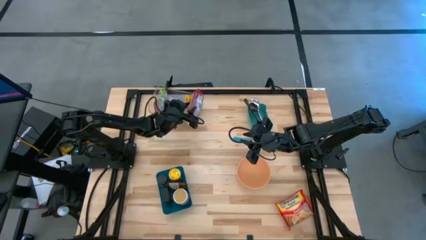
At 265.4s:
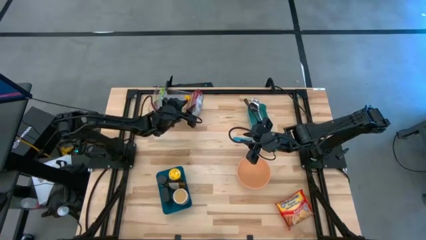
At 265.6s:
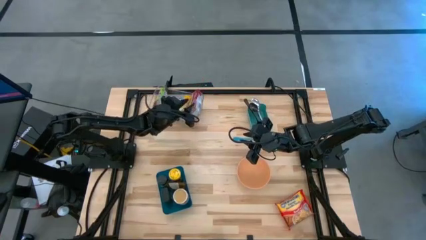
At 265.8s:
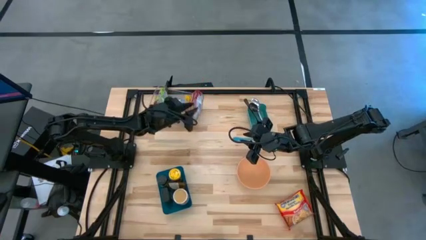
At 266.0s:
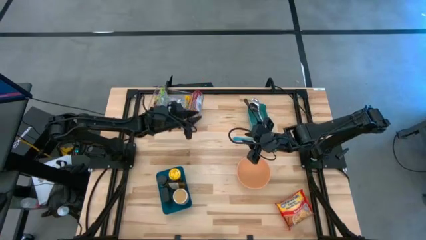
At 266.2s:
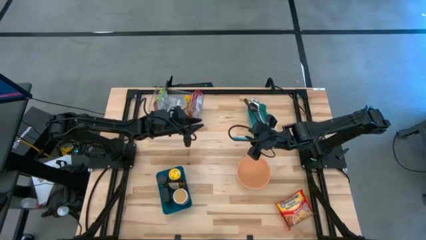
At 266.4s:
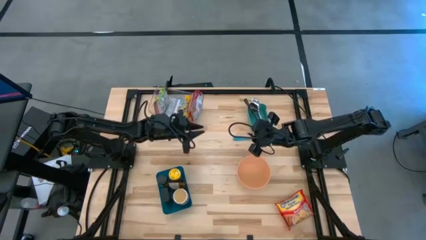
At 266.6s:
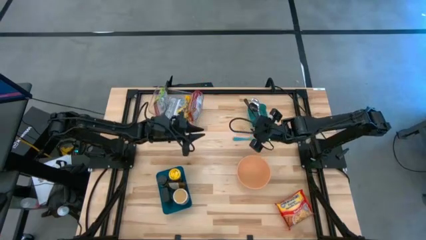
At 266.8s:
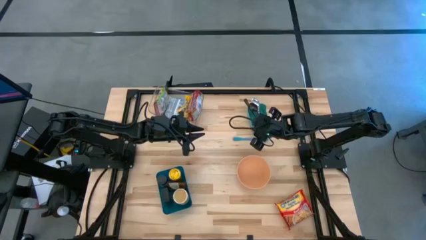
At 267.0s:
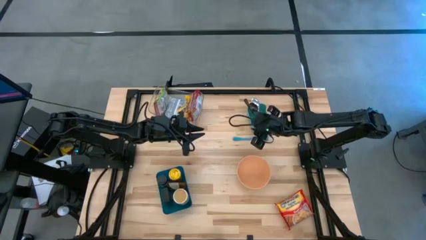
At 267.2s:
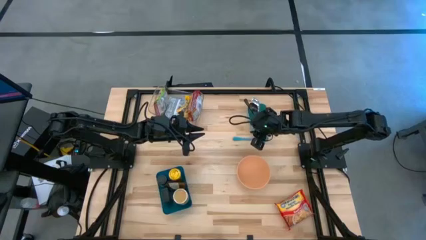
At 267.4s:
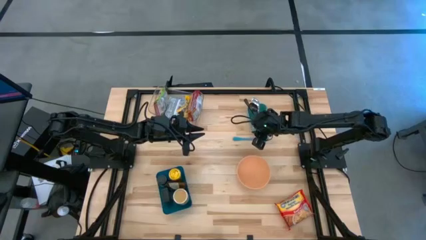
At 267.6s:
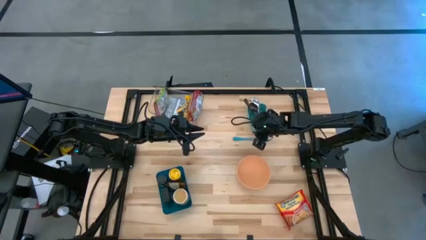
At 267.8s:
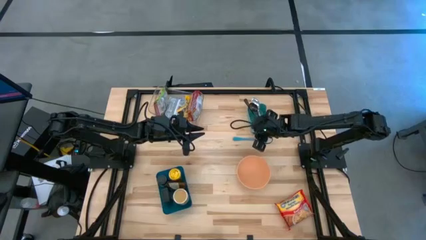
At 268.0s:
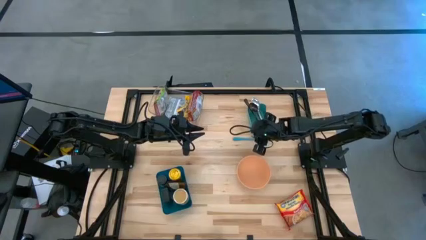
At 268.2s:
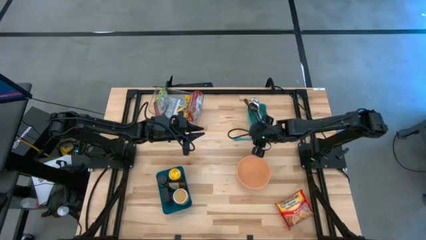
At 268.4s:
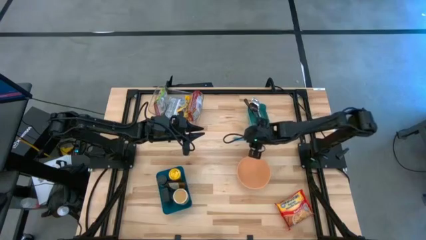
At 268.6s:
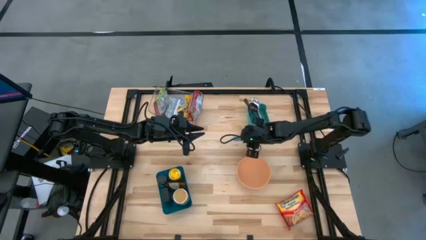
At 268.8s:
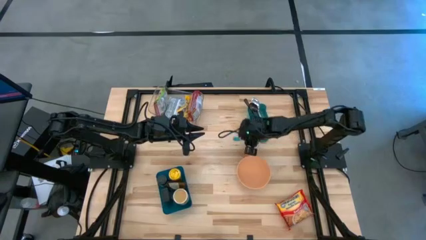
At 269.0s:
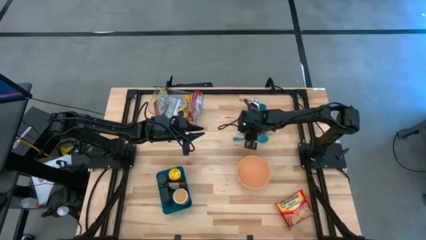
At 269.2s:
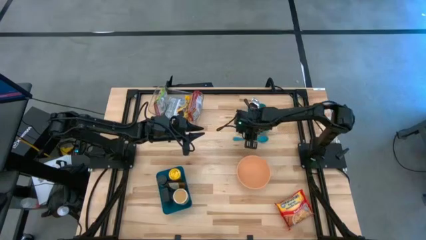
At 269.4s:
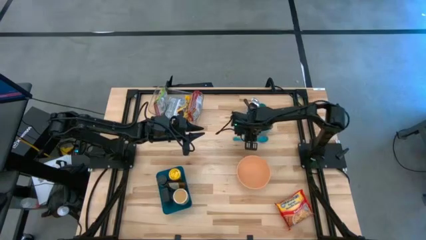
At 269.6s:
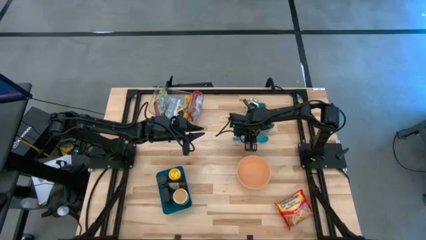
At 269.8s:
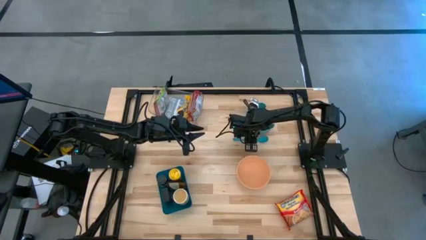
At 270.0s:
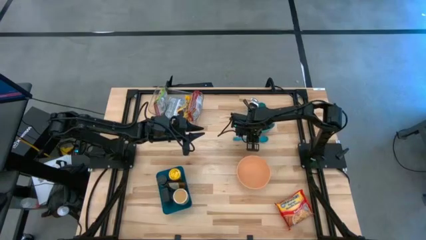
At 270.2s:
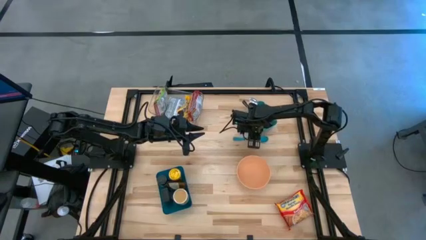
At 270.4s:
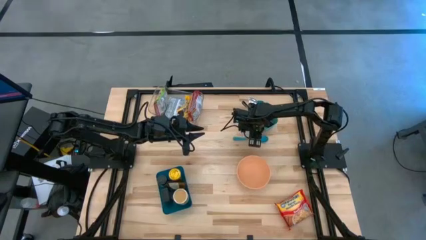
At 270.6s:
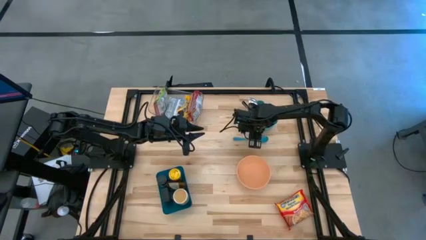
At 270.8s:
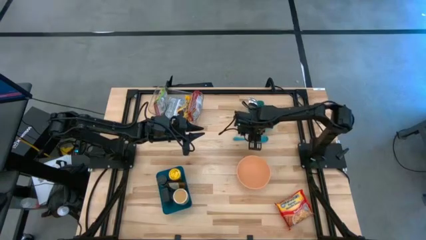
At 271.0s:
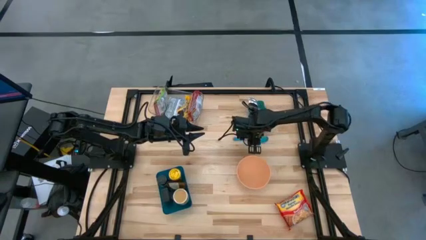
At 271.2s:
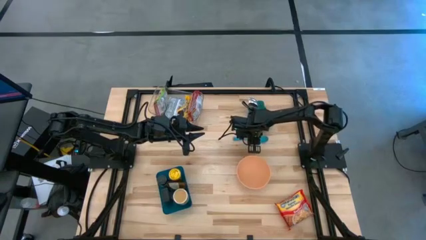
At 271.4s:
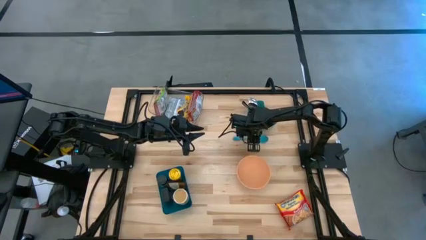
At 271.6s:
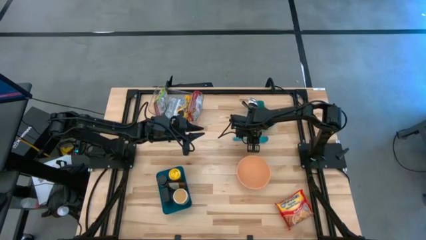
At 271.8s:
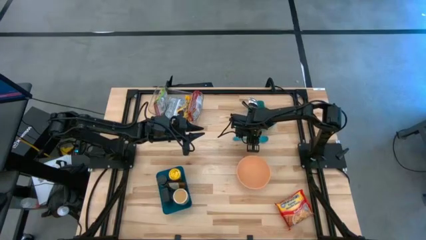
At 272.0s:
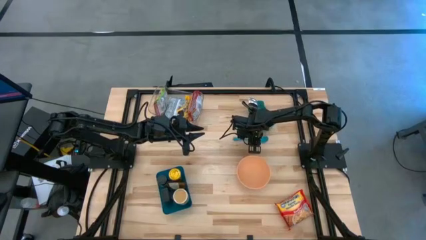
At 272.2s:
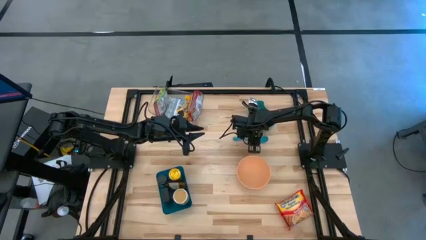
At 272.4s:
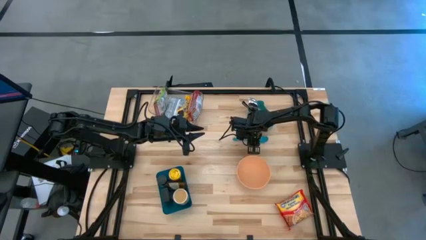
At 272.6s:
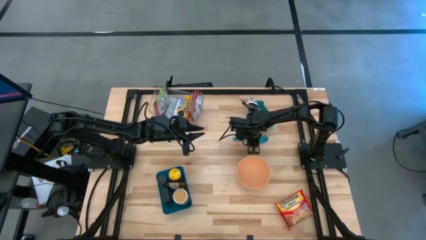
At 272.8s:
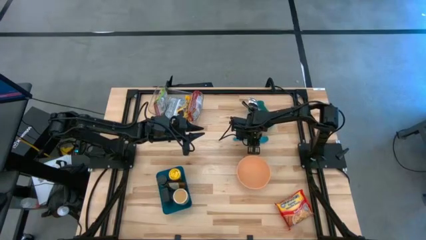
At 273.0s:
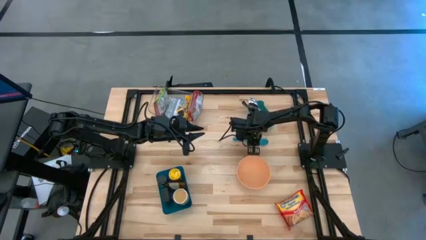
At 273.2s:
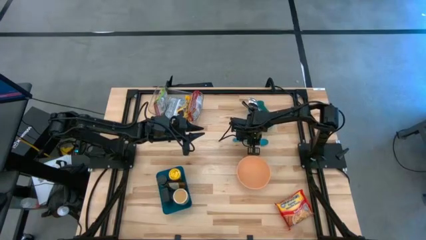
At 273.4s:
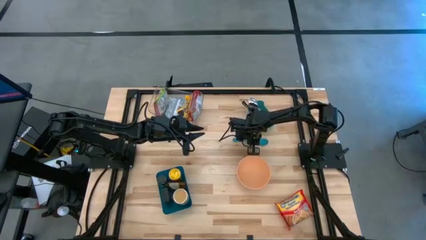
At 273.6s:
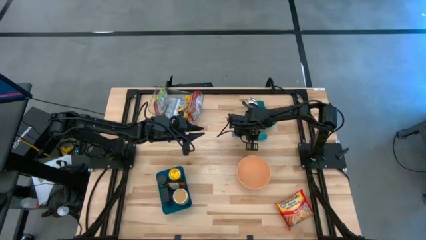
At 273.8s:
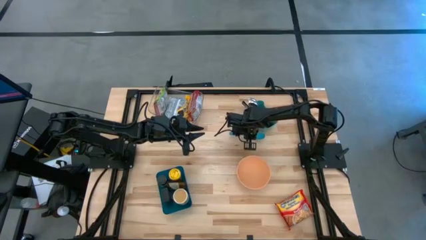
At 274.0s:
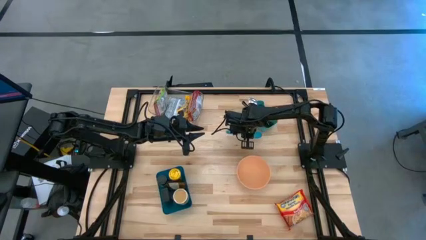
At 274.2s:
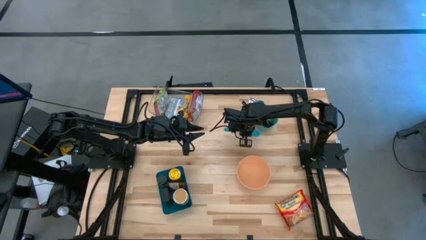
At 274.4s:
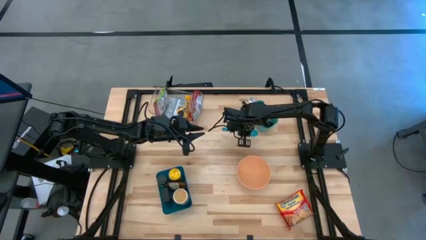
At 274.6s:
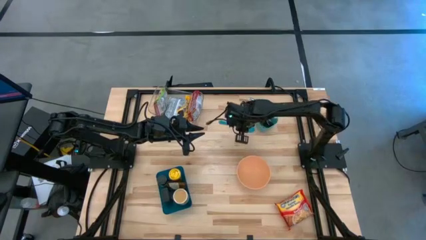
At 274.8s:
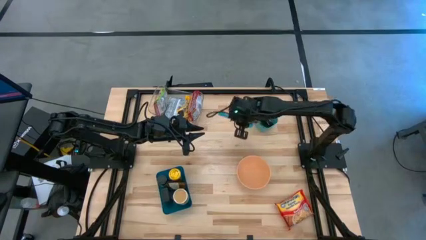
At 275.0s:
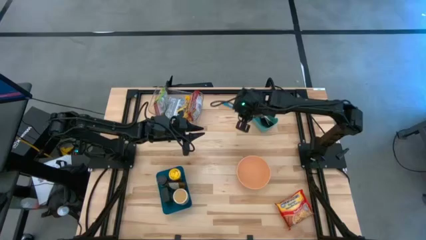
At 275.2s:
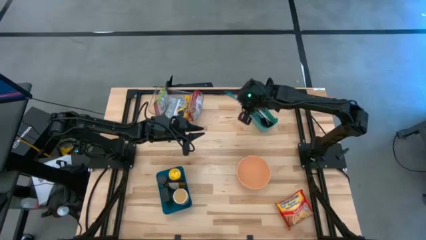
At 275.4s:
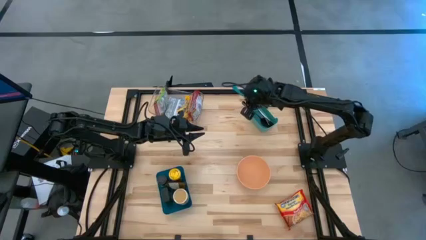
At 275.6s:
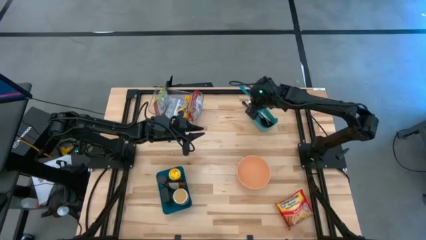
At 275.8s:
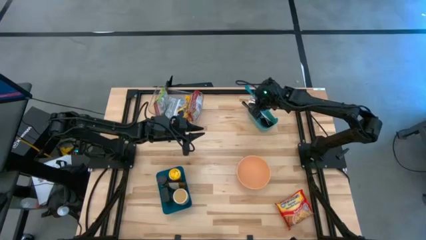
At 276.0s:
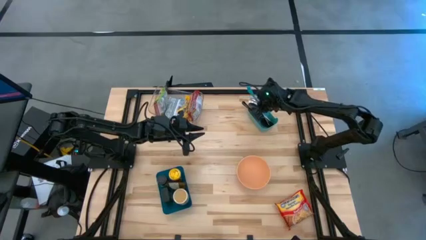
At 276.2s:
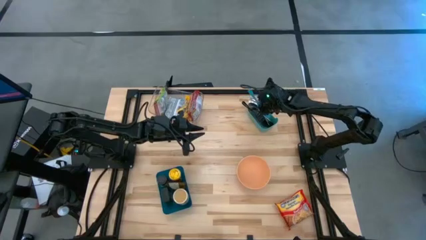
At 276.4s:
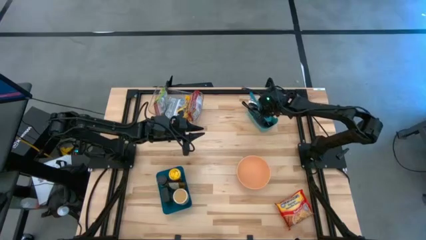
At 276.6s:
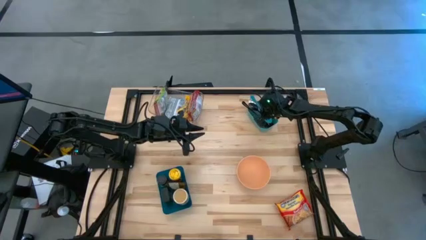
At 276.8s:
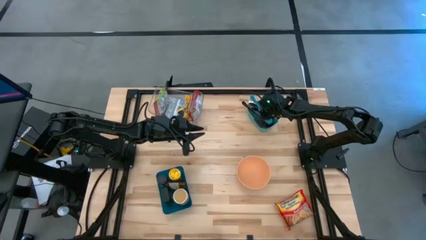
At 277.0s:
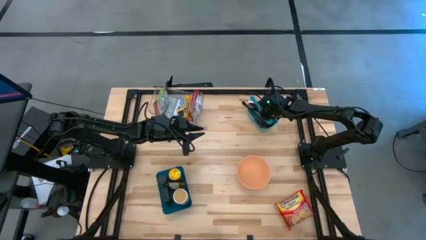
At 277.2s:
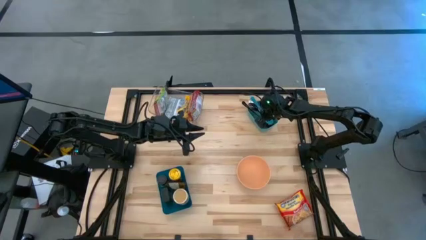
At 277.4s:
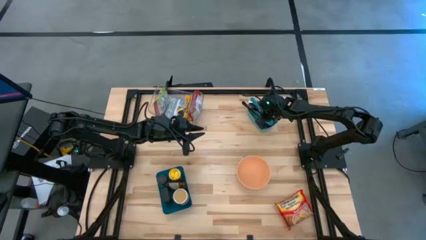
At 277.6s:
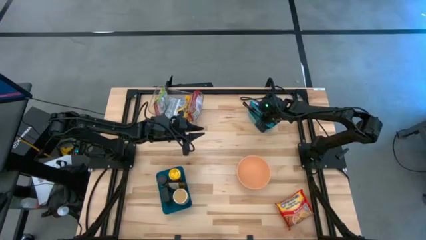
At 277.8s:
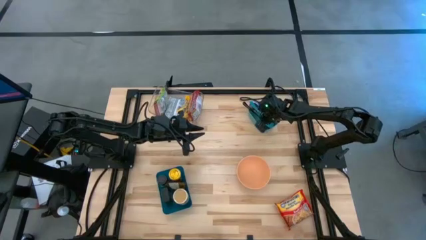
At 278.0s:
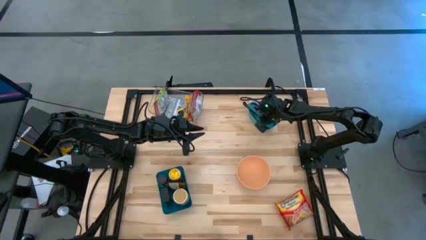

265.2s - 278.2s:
Task: Pick & Place Food Item
Put the blue baby spoon into the green bin

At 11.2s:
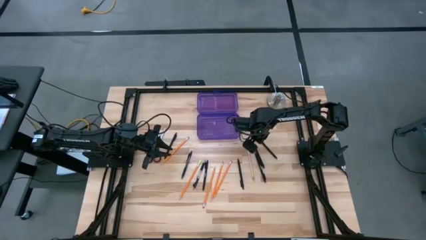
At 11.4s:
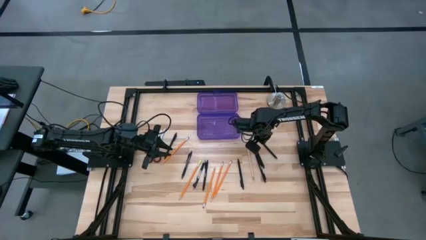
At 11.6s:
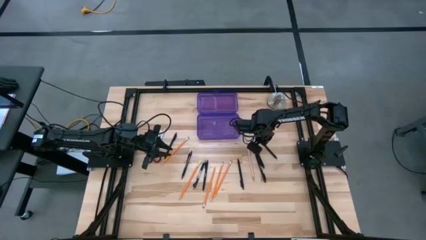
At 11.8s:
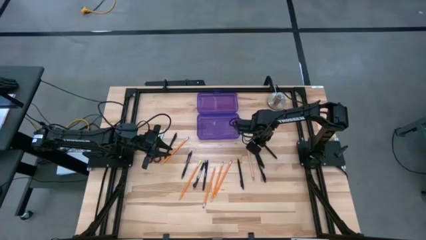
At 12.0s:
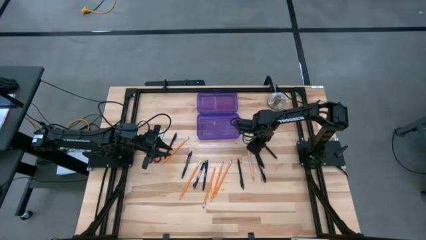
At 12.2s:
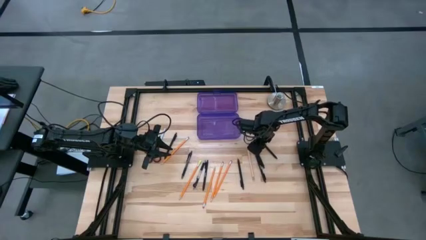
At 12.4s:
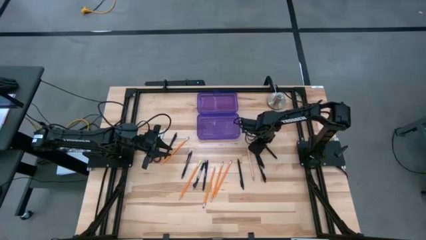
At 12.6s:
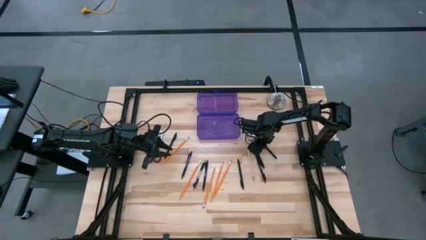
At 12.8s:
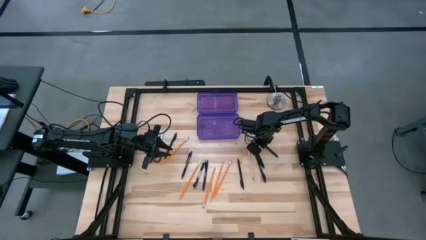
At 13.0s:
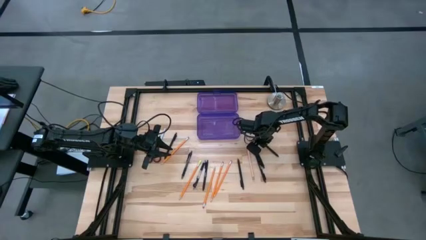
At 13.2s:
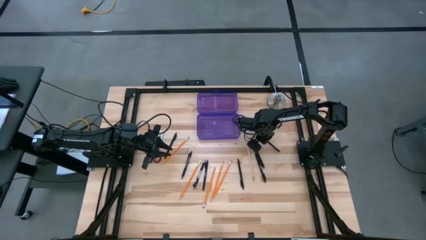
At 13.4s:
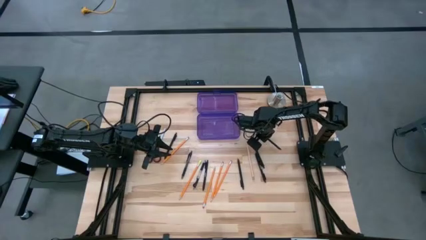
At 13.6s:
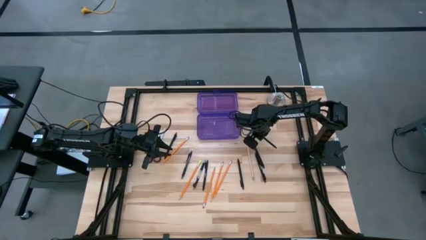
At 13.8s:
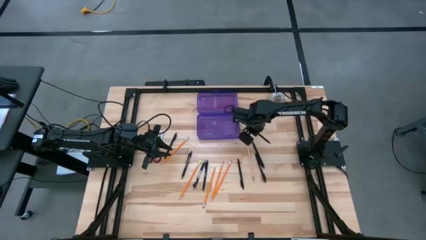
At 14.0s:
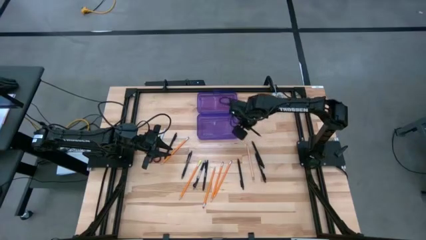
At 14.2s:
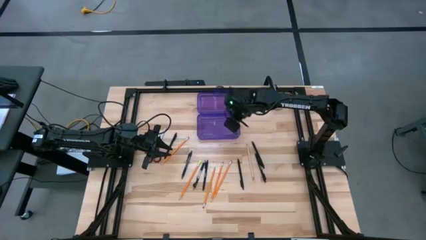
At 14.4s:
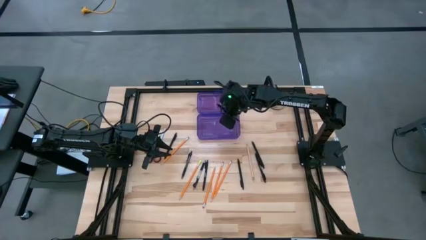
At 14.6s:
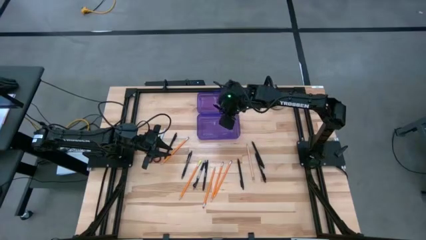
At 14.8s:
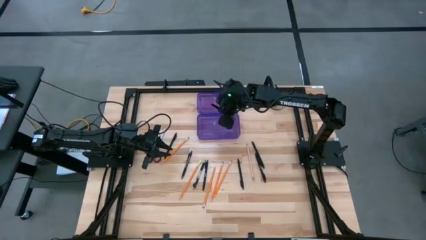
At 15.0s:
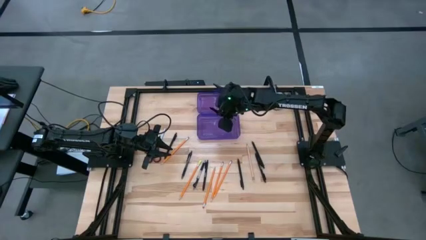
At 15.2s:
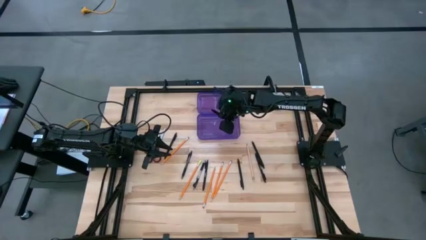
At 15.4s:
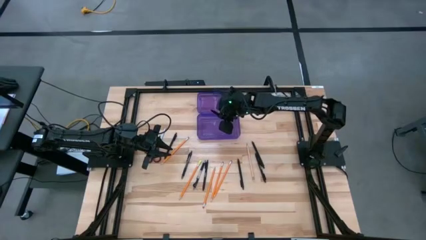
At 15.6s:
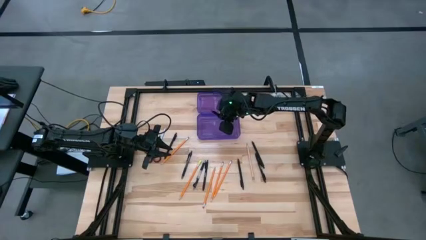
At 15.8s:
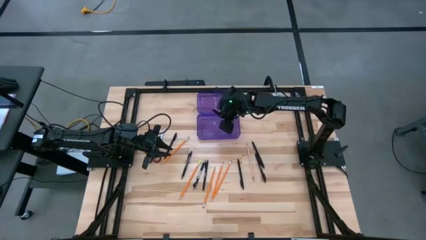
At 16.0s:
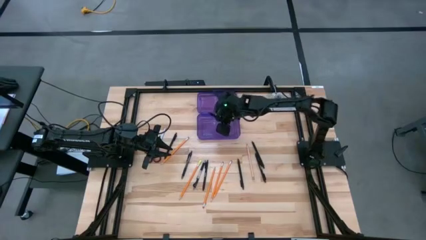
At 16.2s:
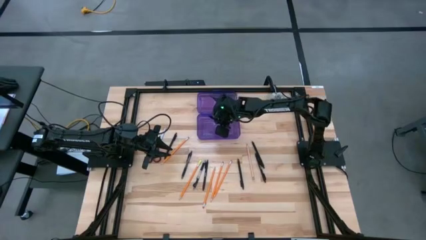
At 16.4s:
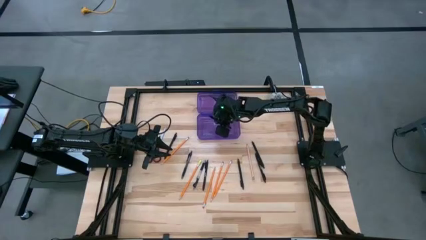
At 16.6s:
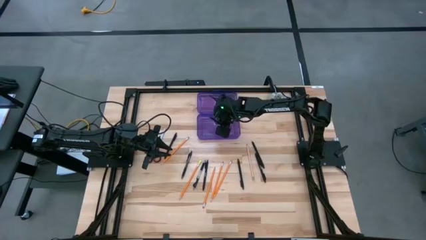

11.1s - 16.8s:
Task: Pick & place school supplies into a supply box
Put the black pen into the the purple supply box
